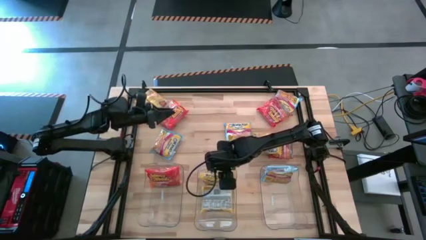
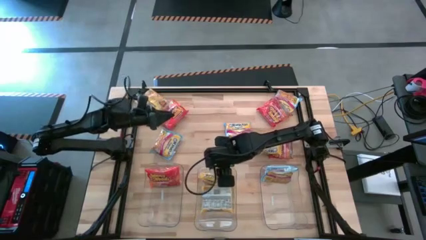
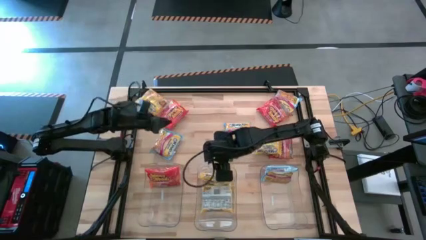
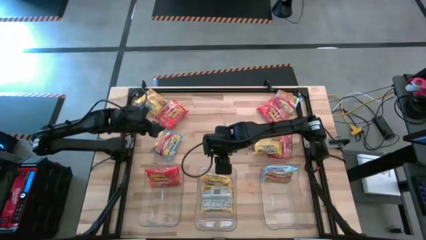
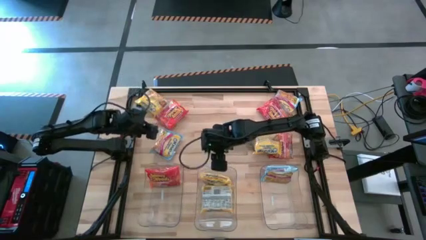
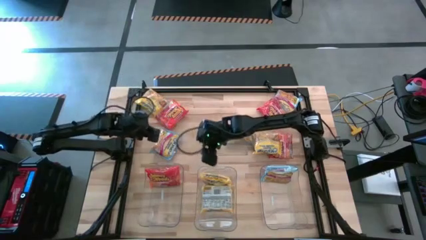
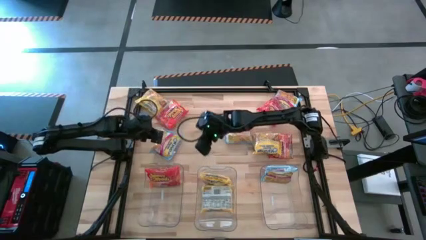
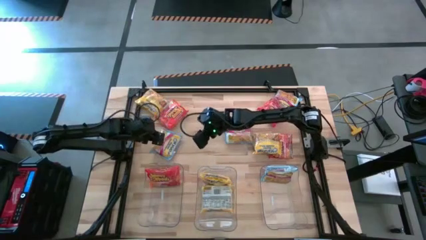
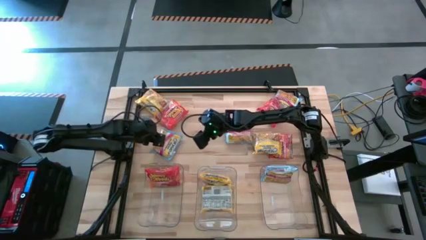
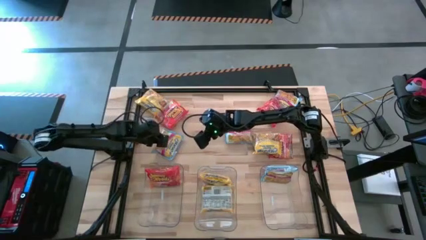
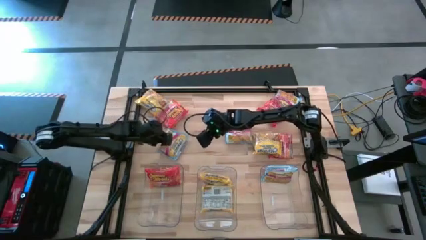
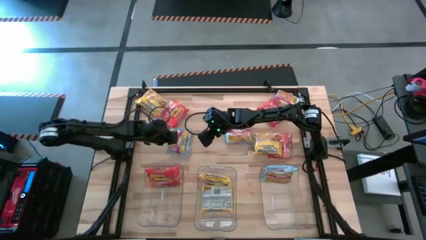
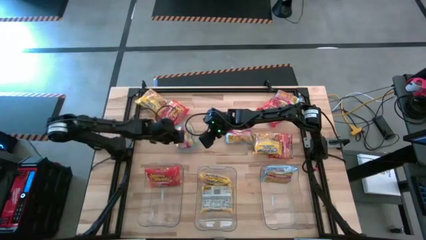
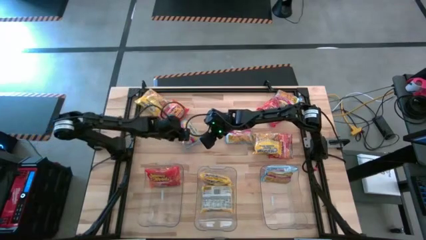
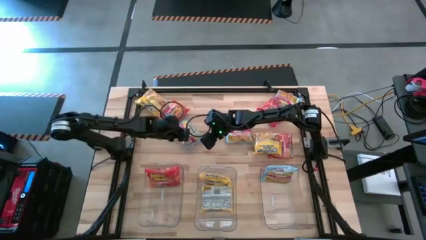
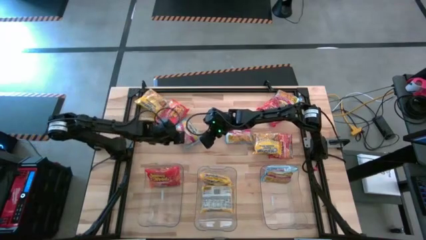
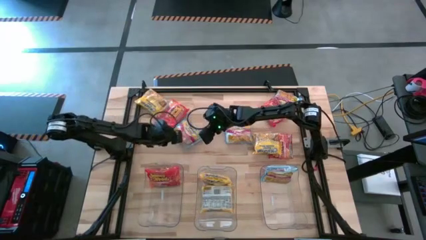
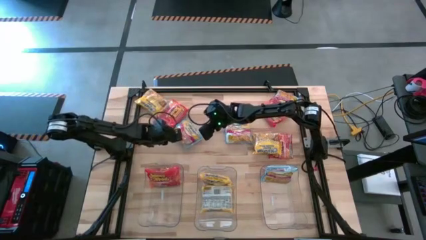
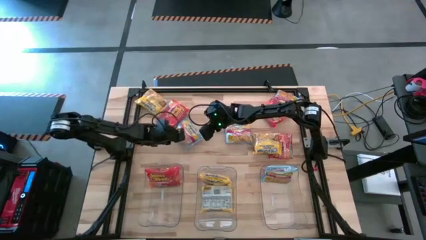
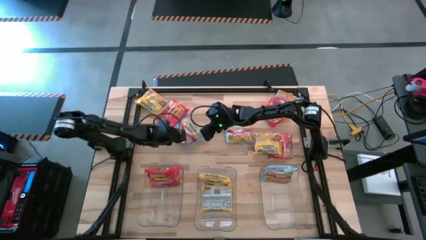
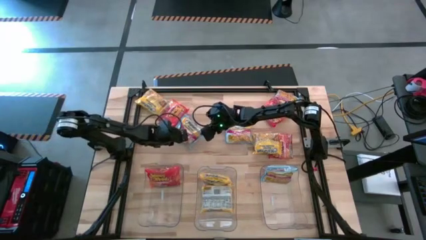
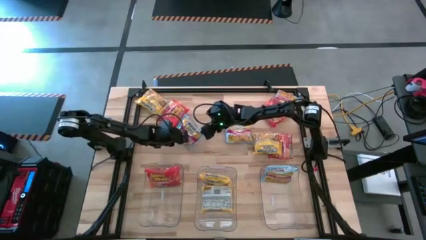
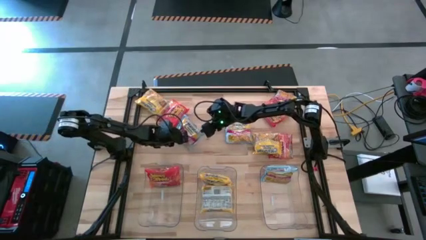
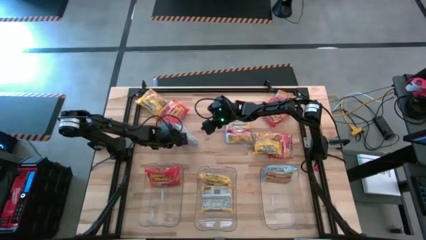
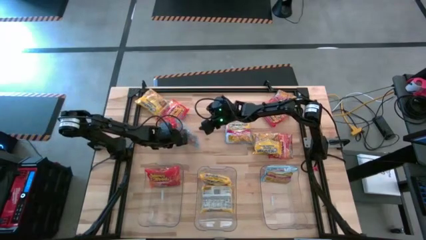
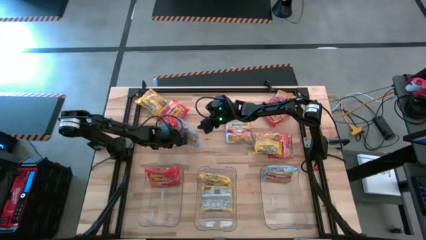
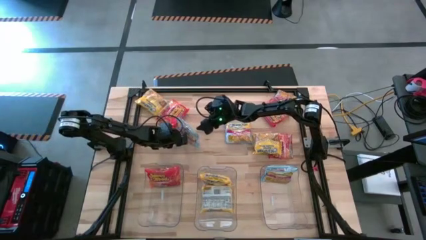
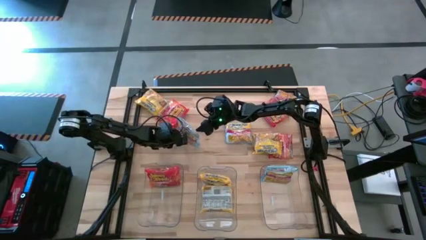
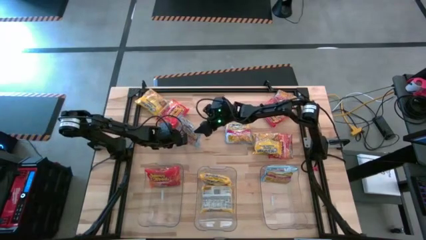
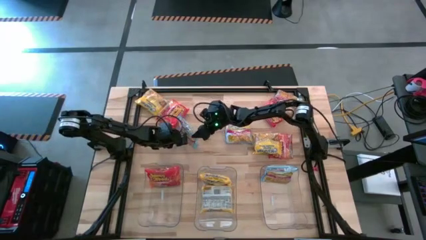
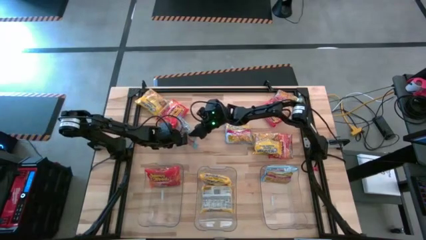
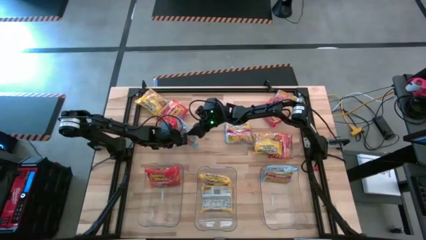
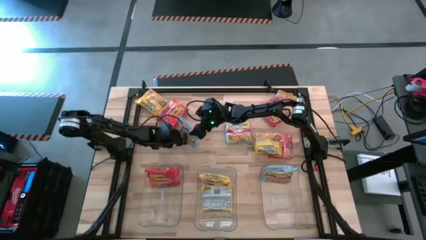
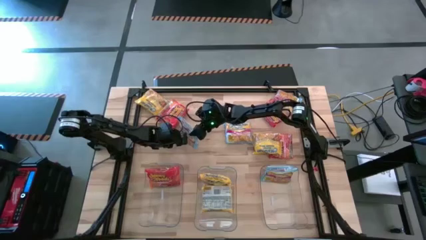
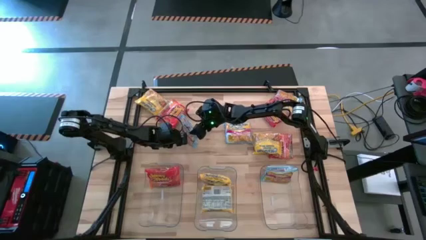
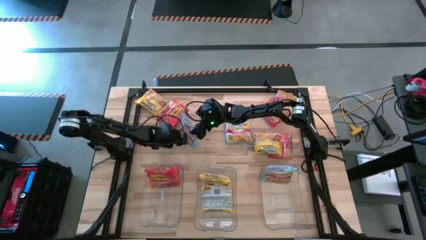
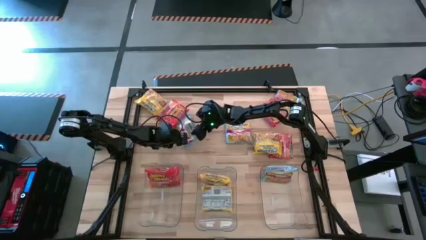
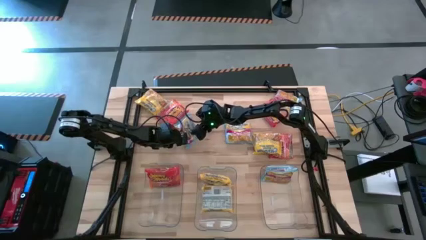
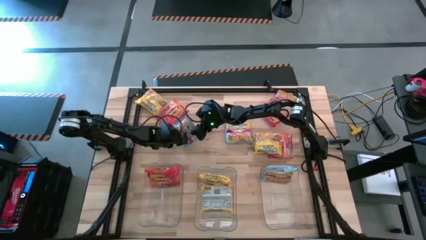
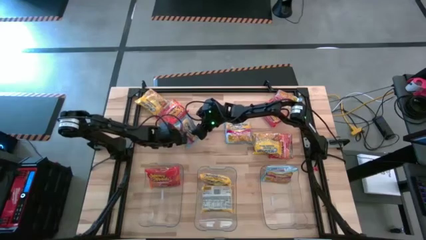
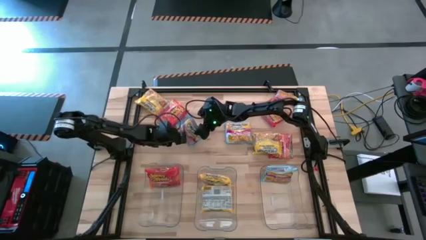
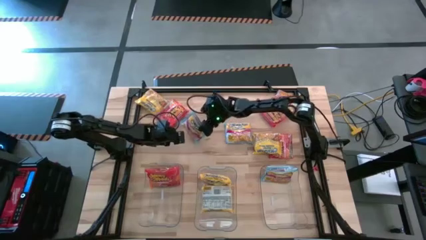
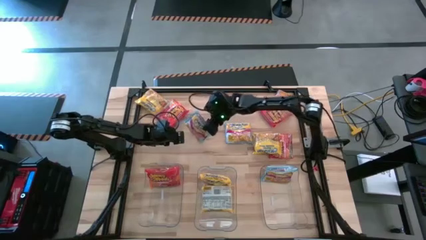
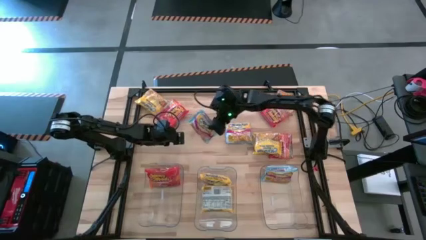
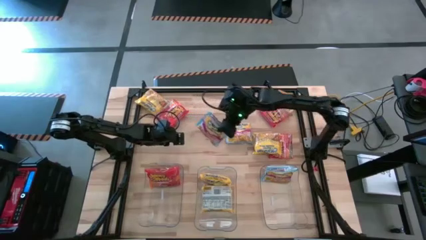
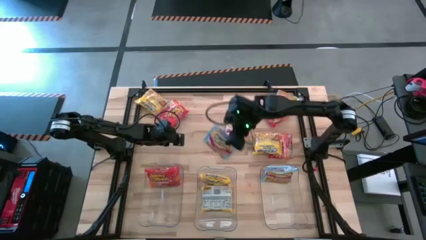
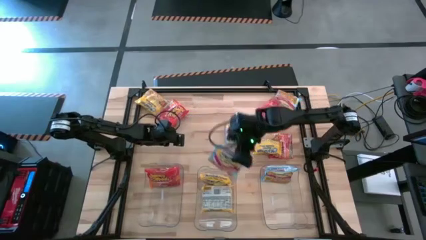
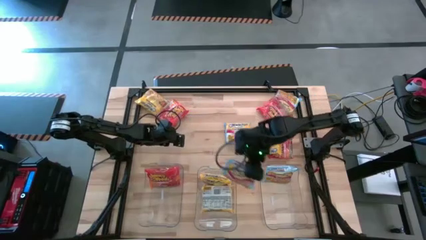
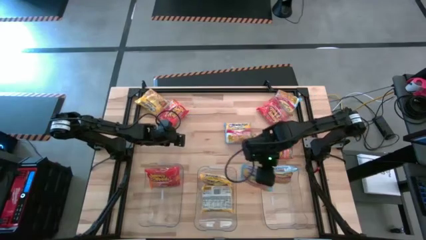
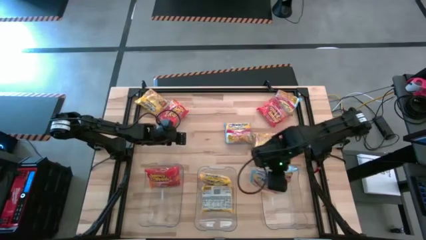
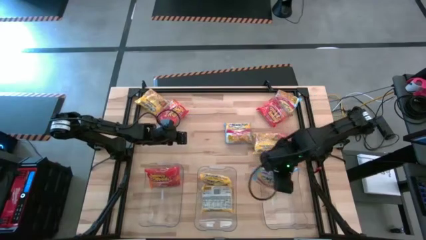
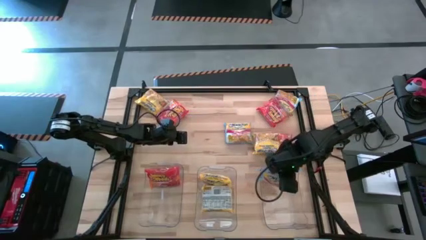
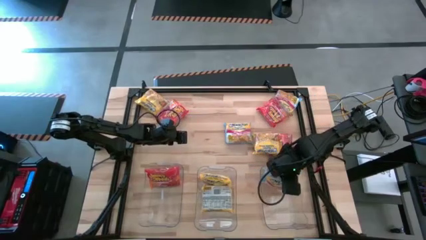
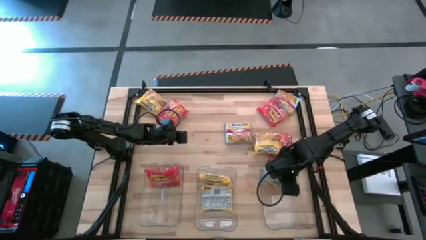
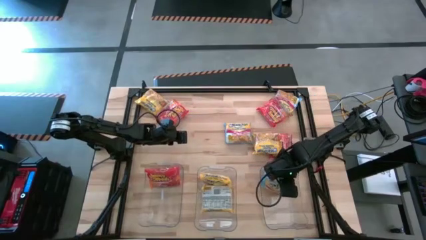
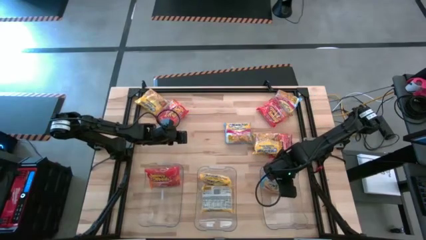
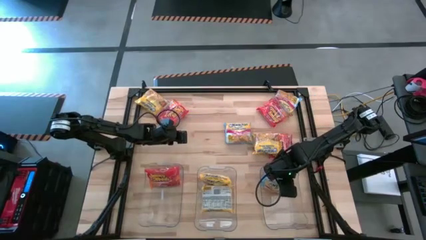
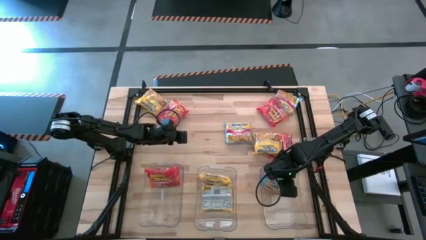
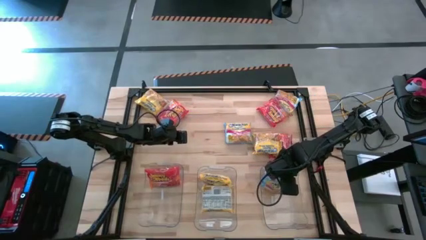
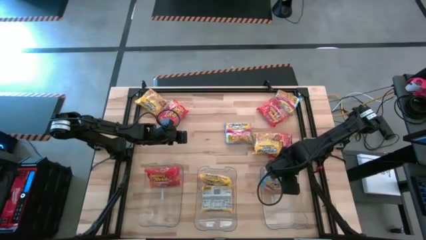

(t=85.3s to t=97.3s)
Task: Sort Maruchan noodles
Put the blue noodle pack into the right transparent bin
